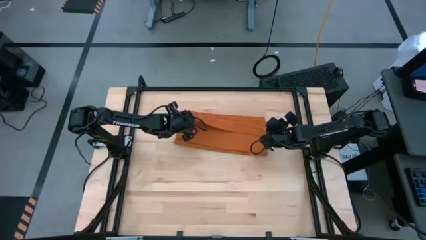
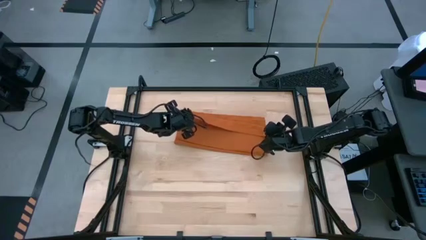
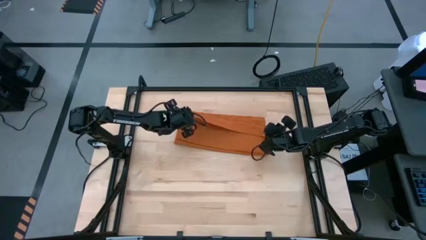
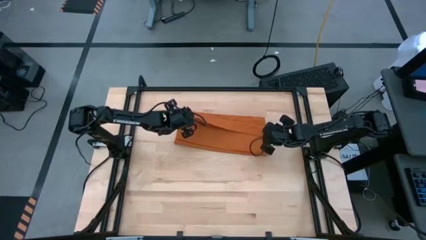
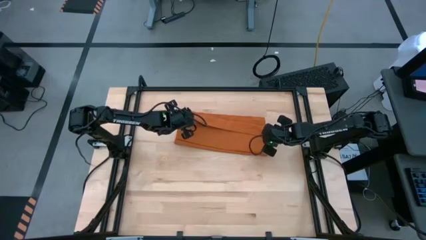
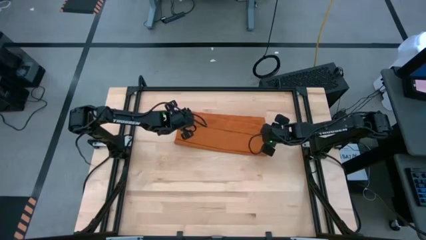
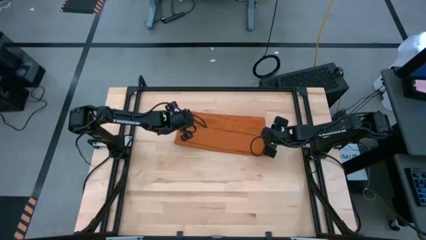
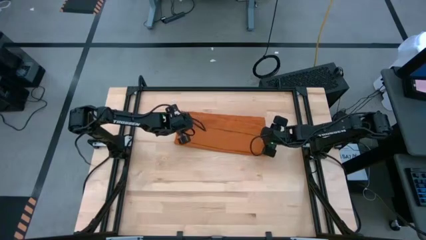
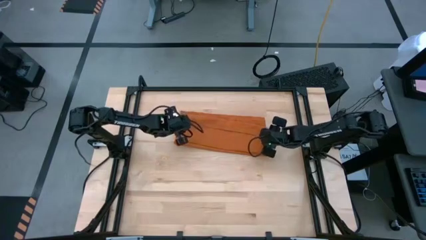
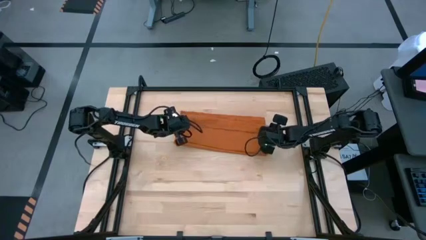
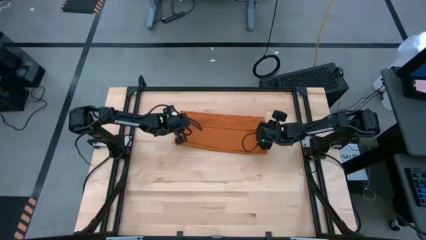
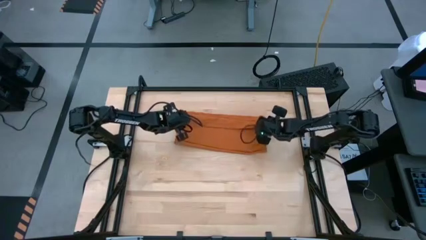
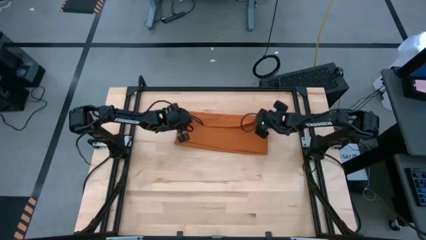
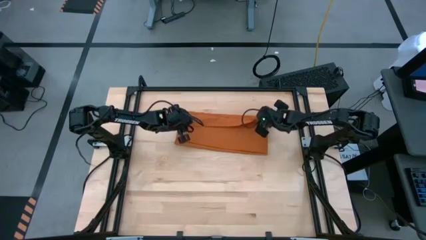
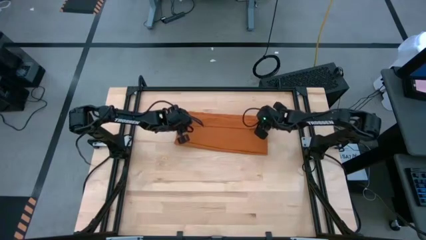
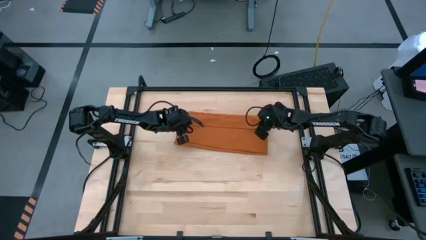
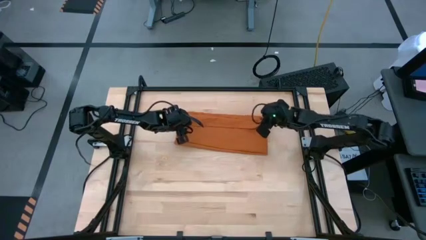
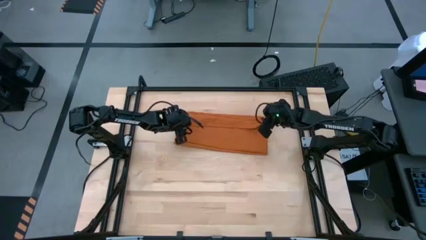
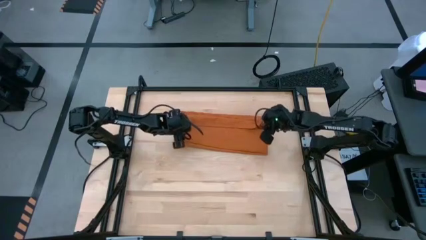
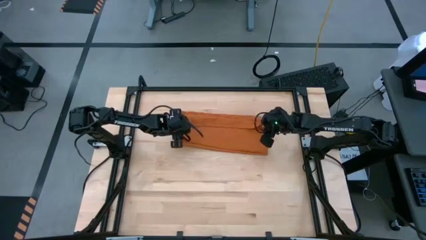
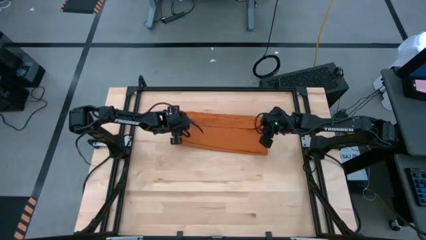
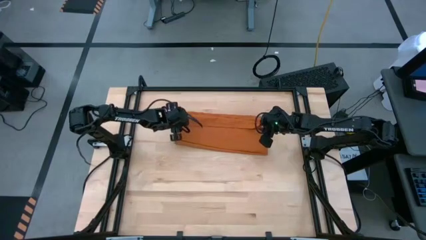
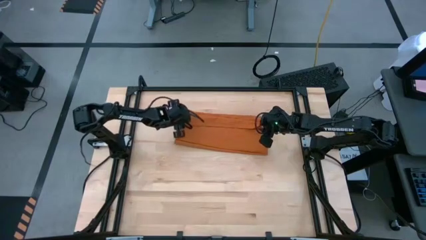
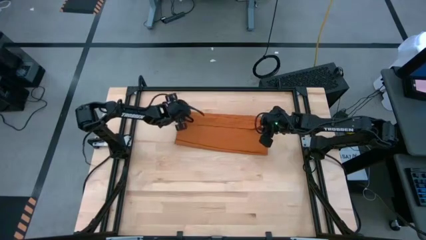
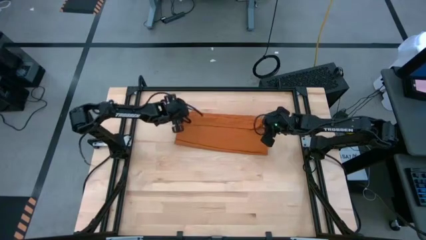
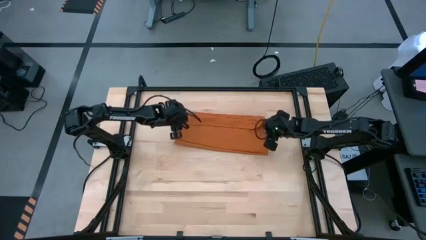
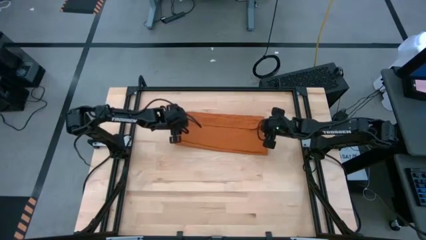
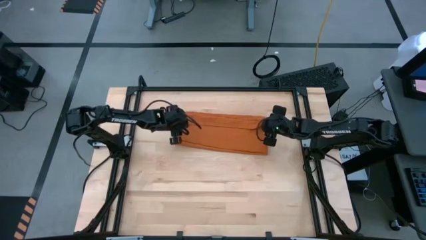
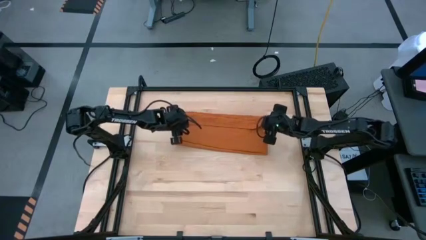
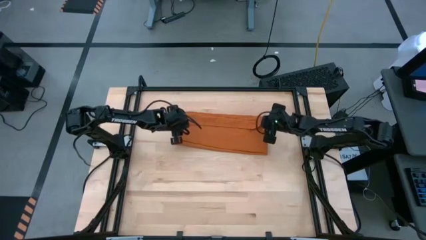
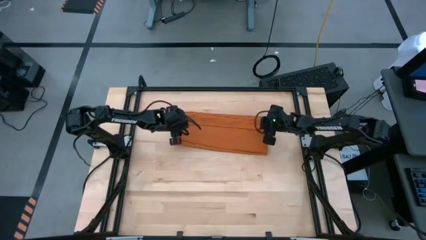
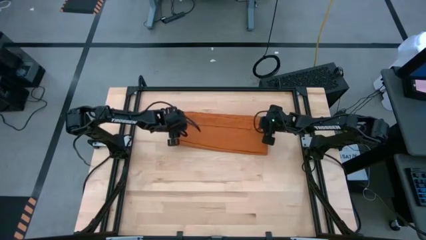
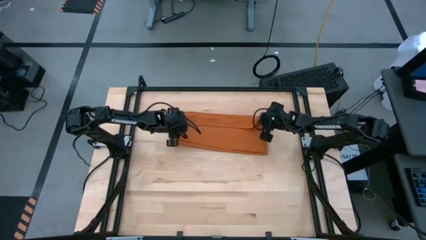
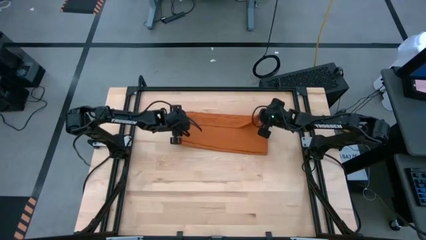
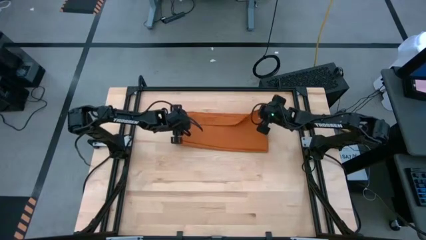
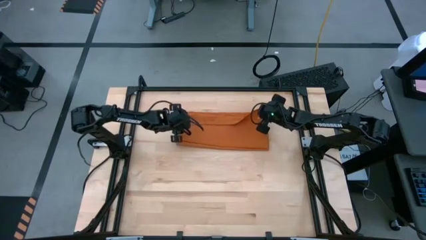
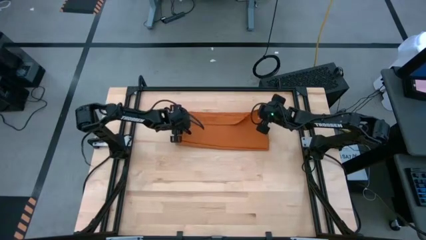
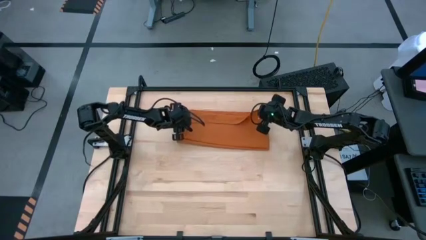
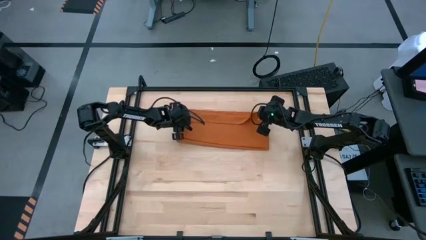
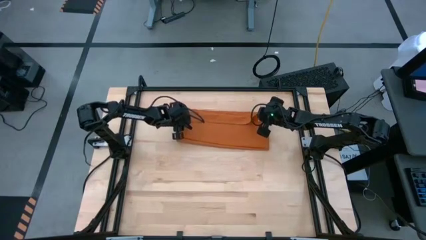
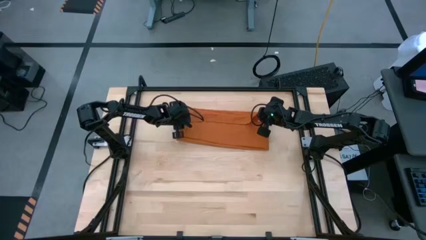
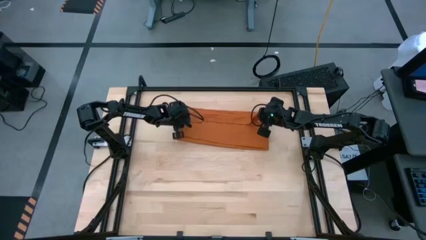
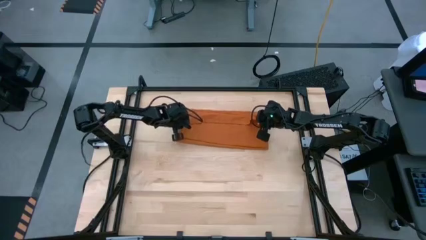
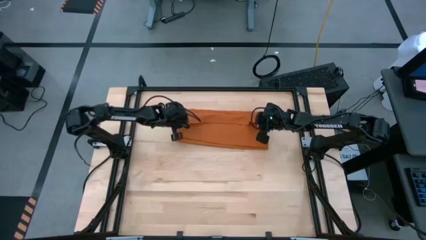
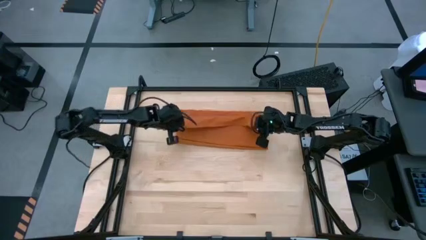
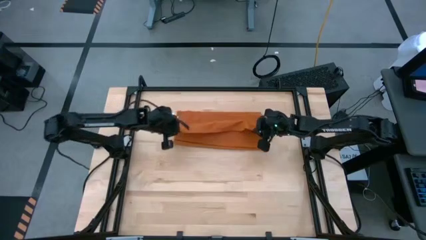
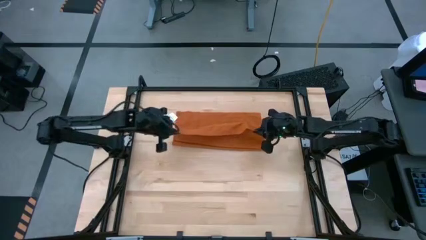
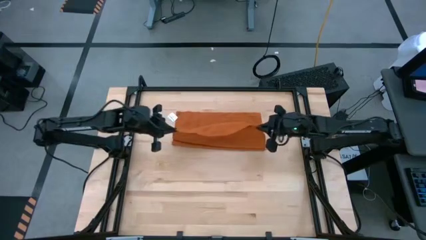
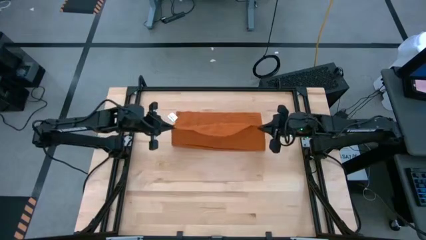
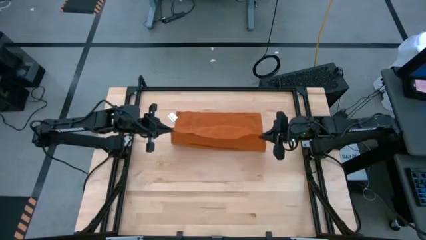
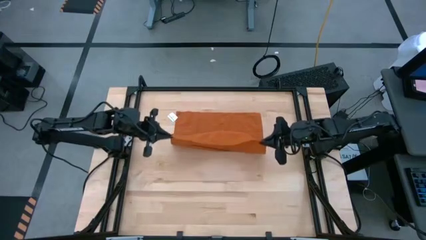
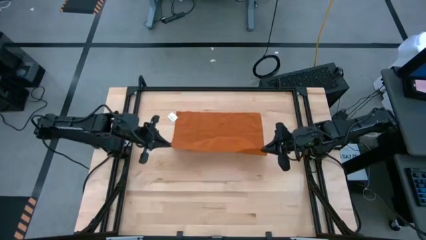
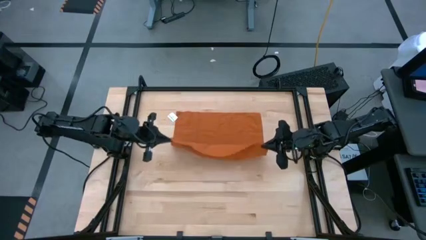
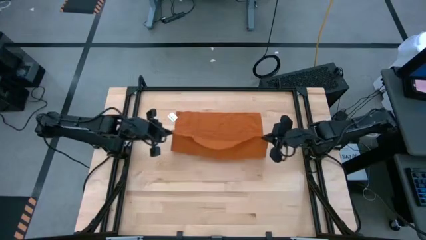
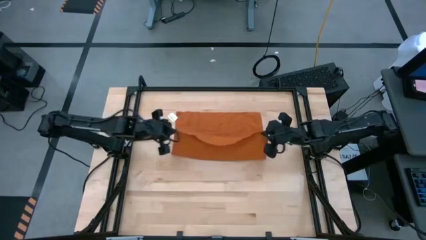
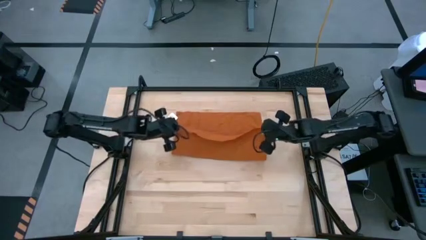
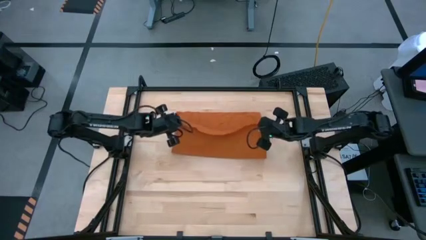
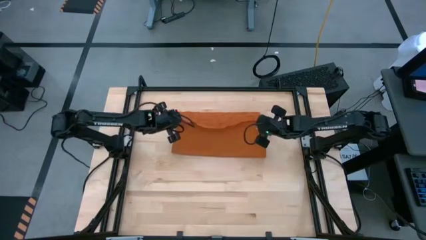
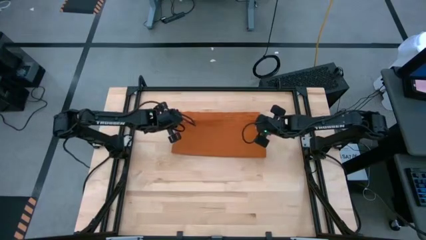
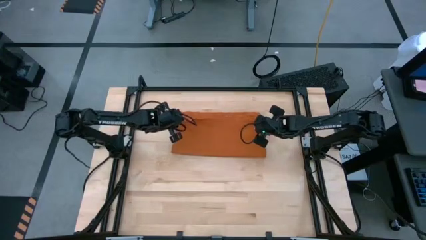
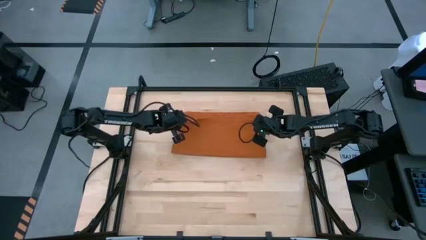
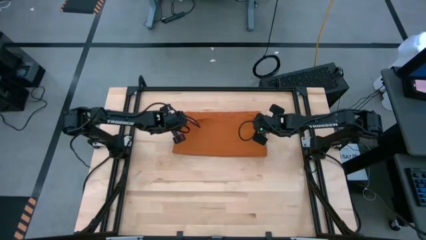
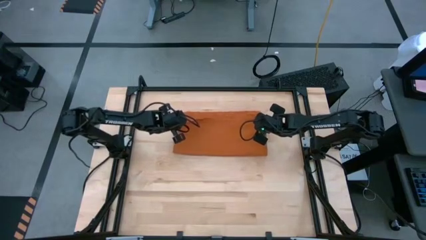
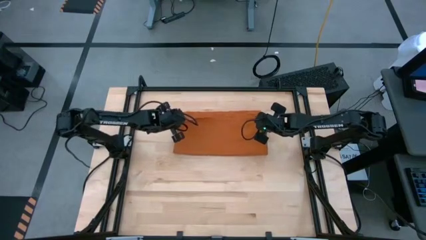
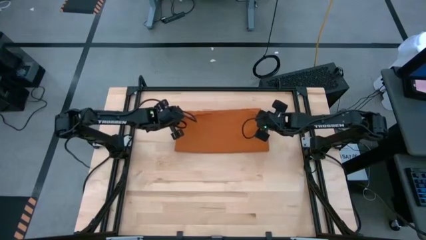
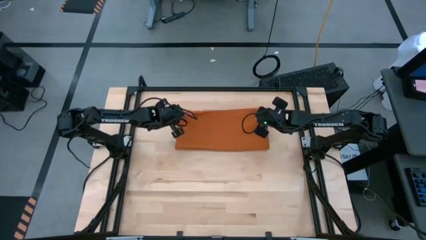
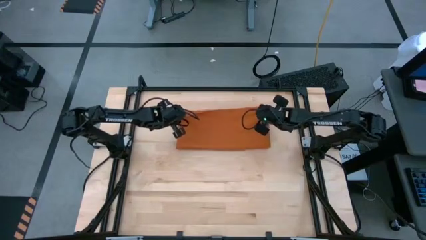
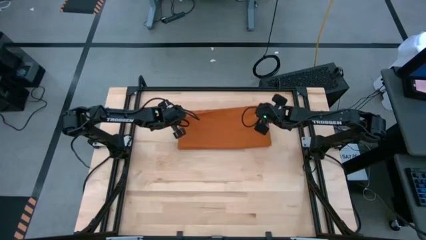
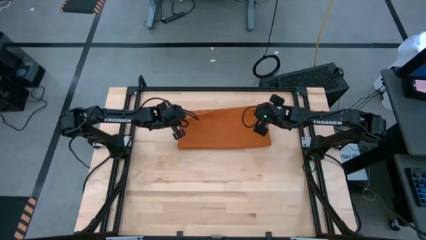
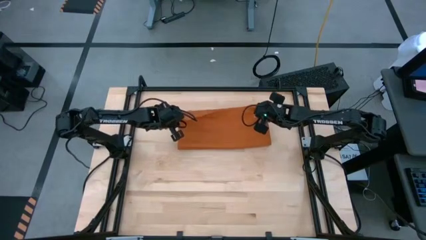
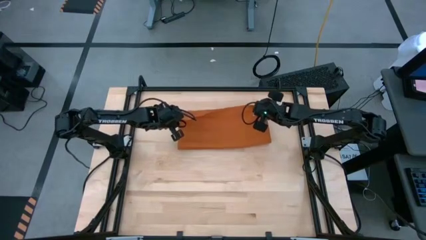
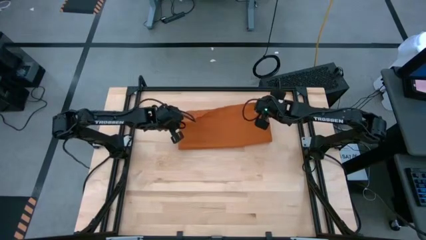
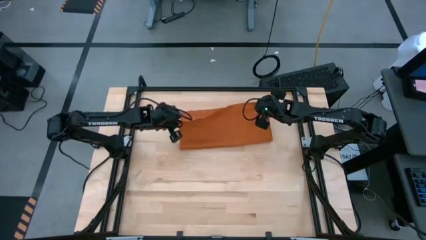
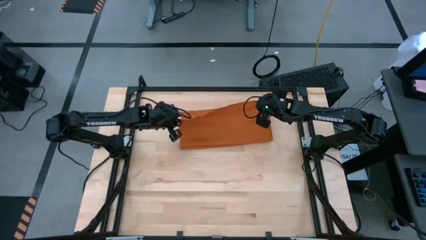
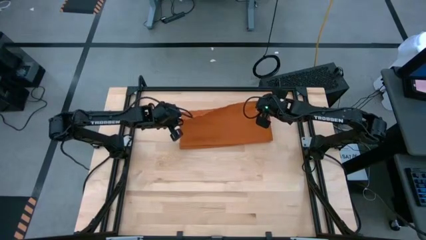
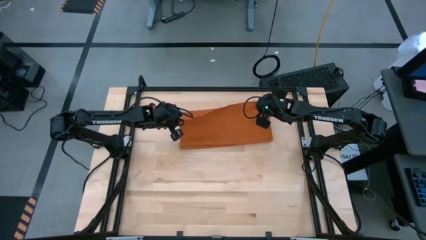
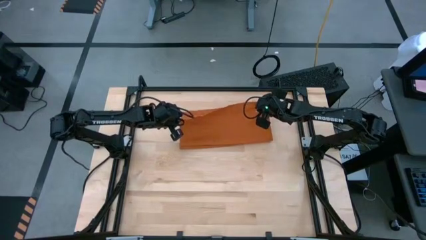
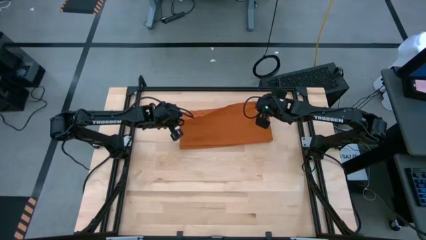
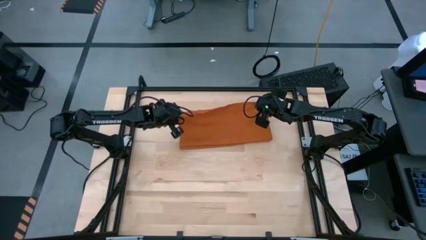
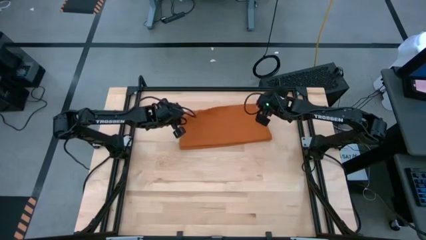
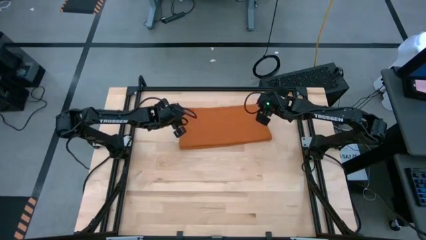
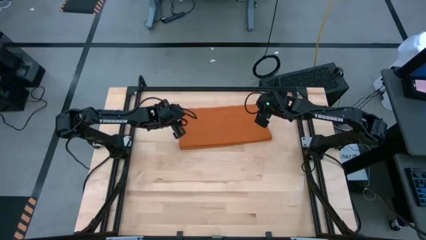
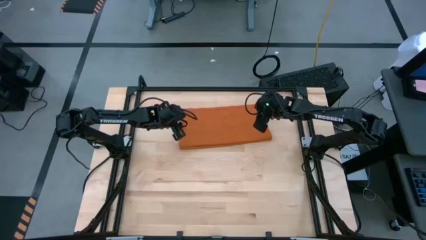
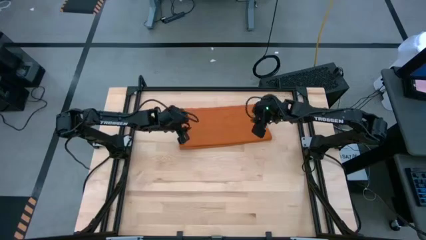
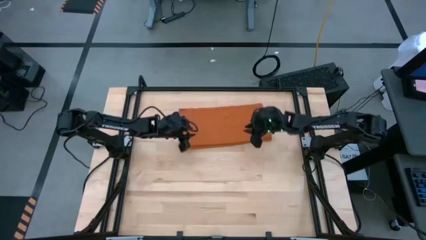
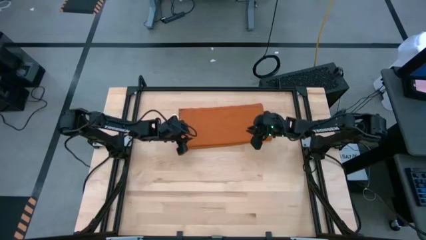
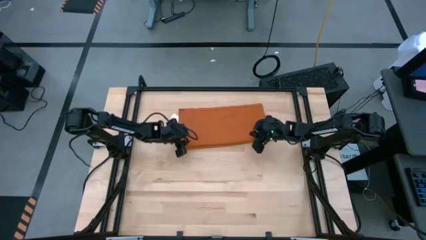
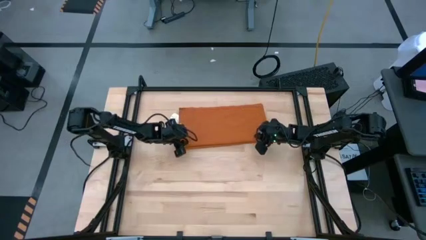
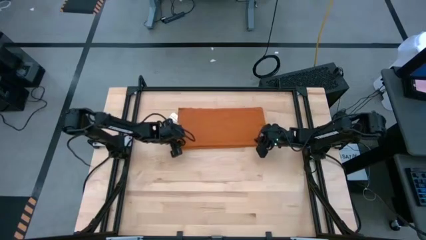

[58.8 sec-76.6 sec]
Task: Roll towel
Roll the brown towel
